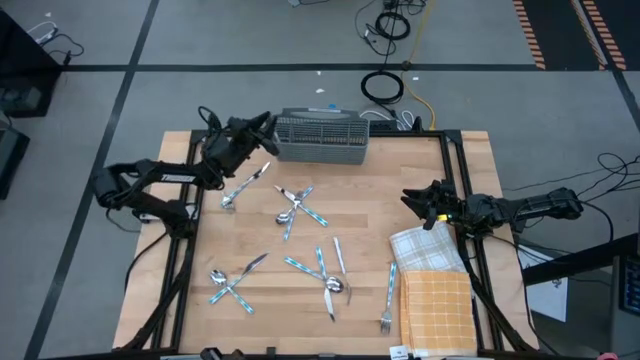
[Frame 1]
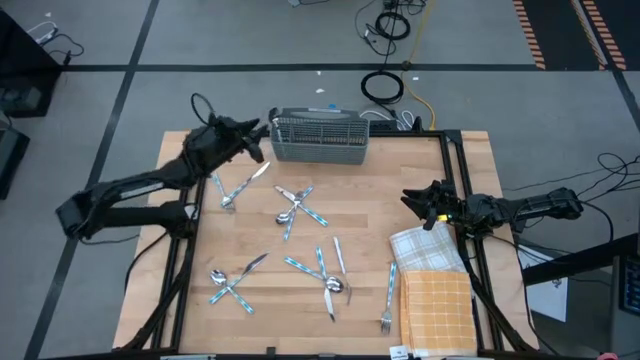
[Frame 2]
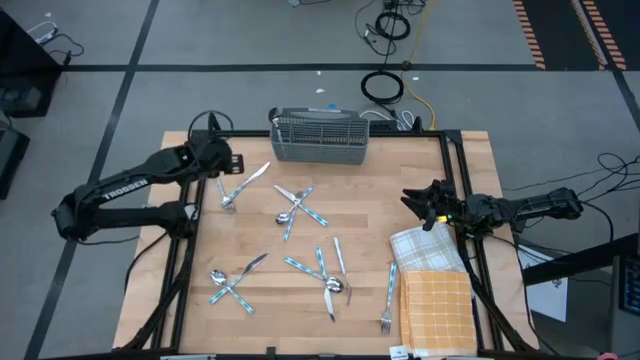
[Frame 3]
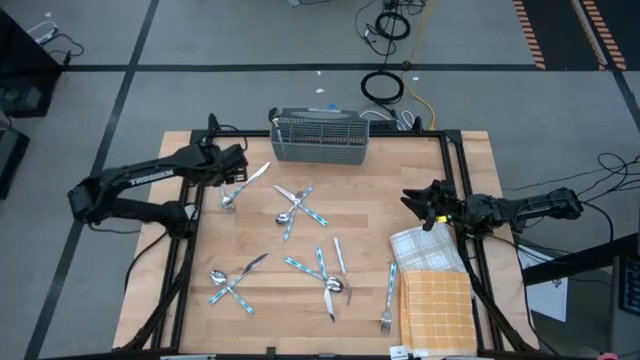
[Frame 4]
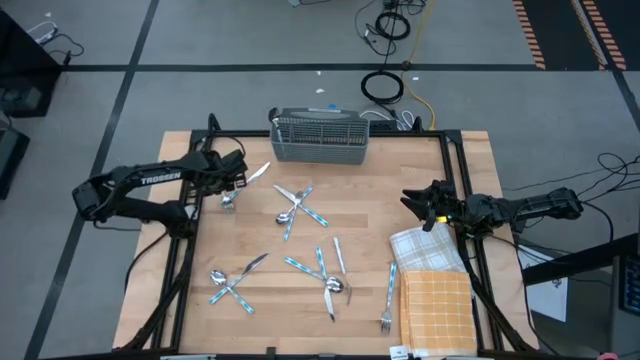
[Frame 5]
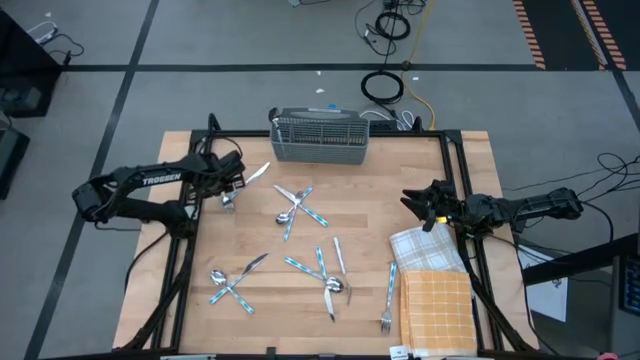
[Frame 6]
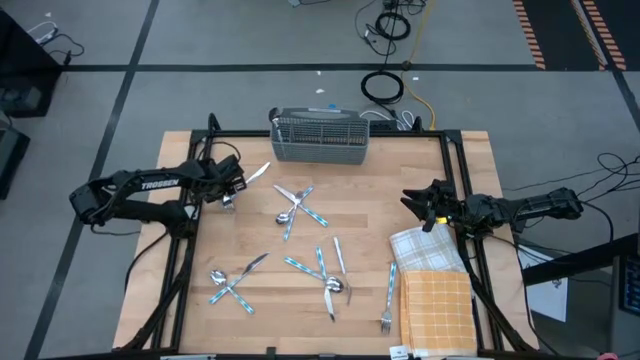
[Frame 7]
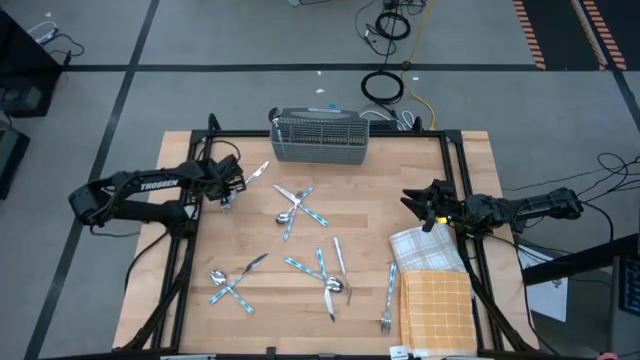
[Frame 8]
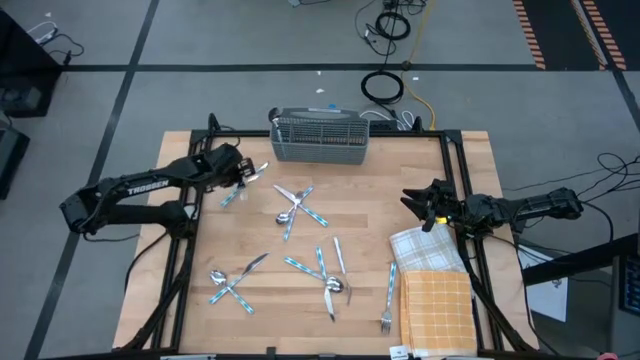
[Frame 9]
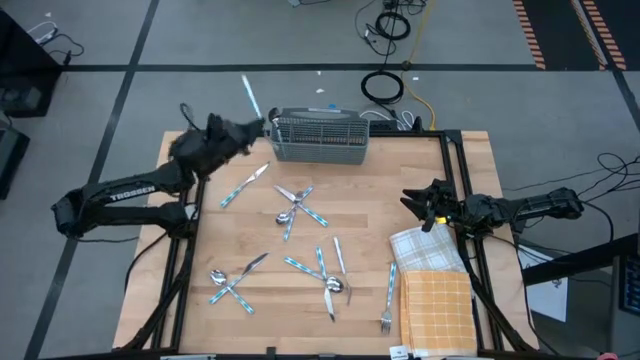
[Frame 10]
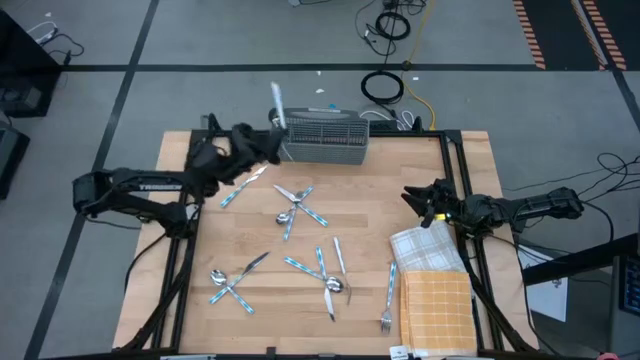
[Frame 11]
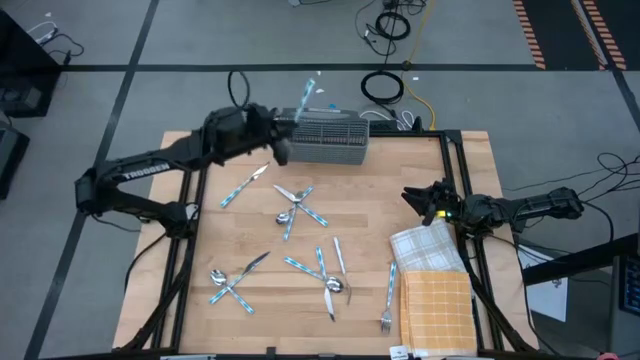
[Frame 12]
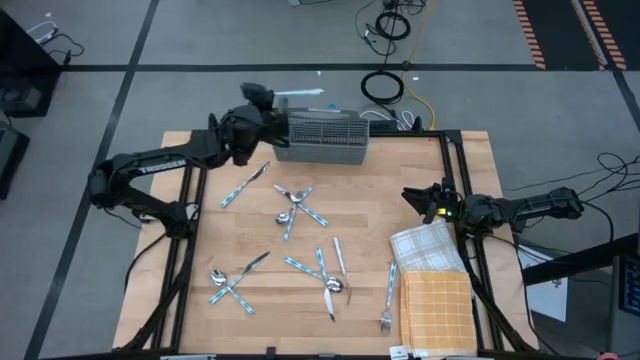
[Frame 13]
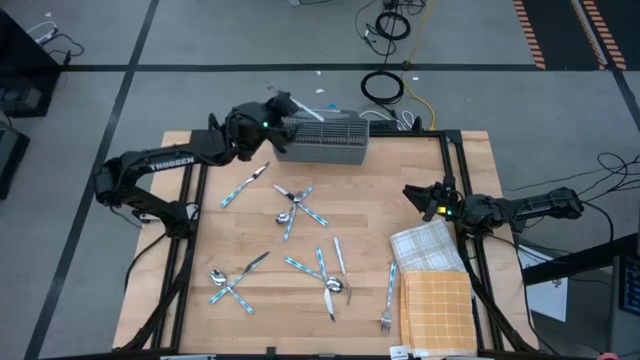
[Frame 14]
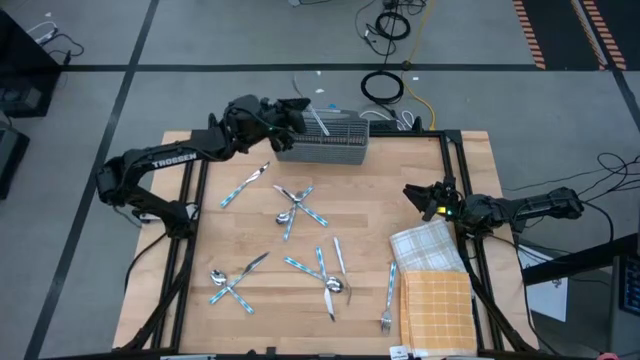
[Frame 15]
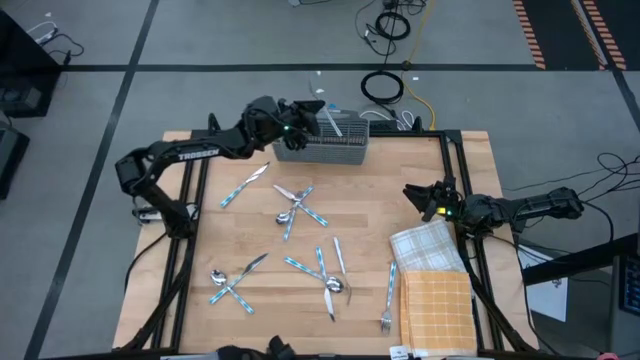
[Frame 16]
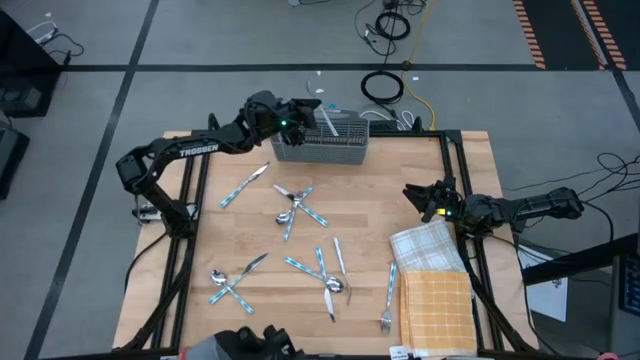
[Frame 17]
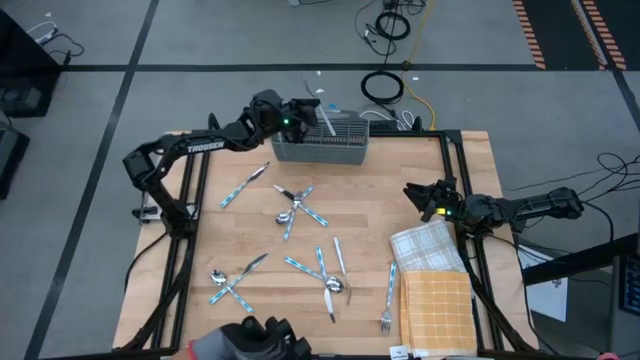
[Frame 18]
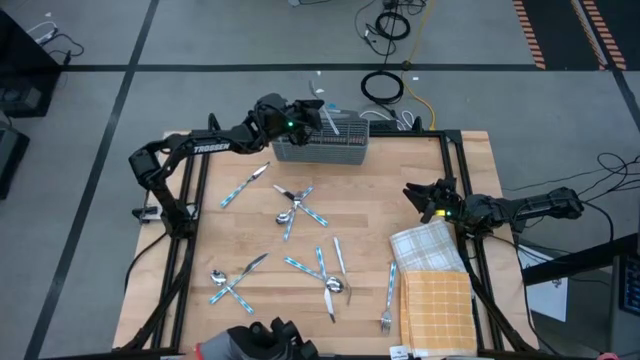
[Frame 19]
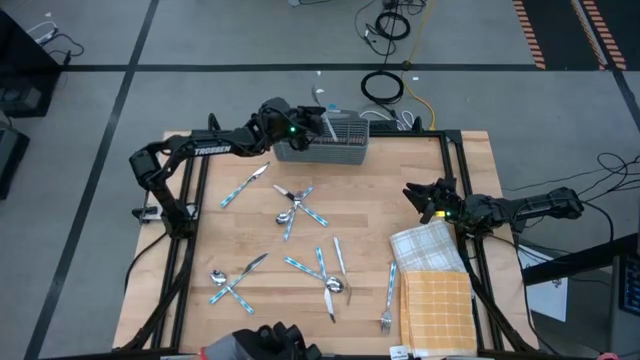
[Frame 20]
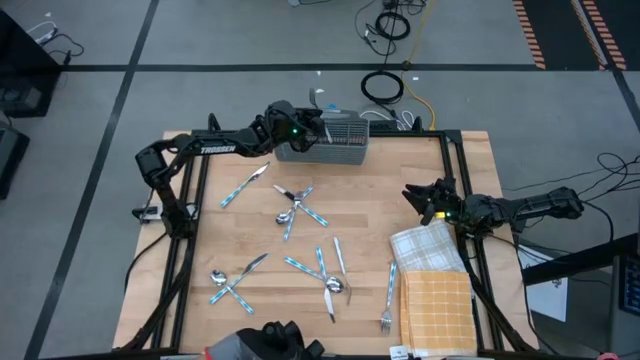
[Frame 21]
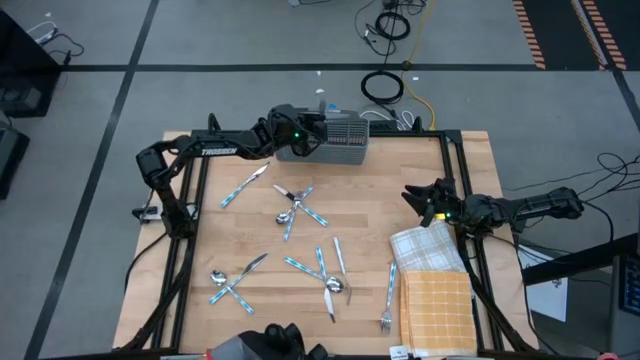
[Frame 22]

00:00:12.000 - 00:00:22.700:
Task: Sort silverware
Put the top left blue fork into the gray silverware basket

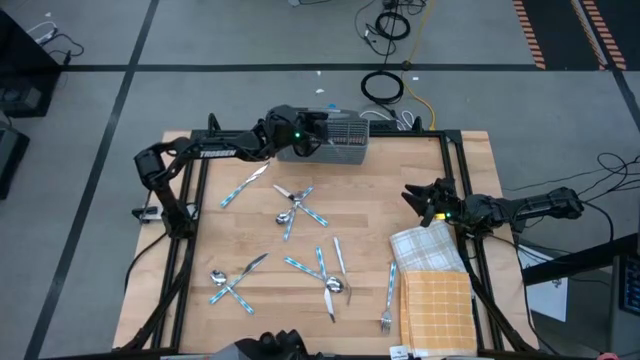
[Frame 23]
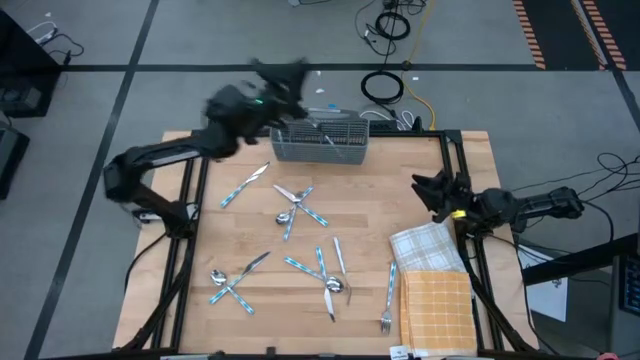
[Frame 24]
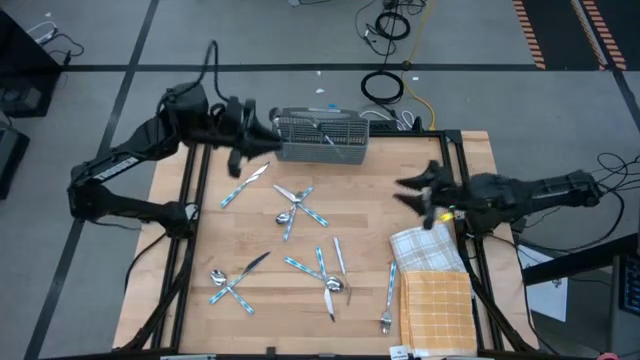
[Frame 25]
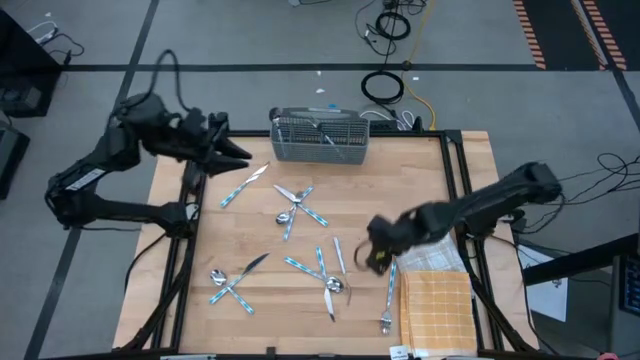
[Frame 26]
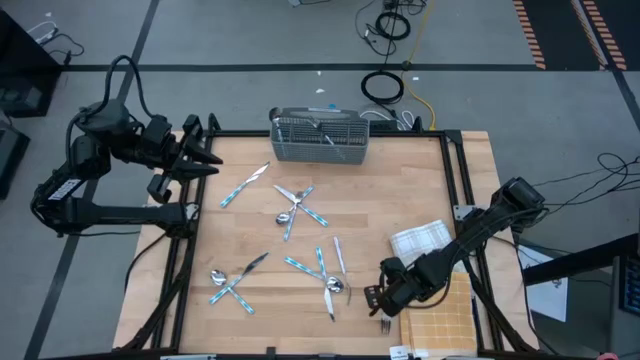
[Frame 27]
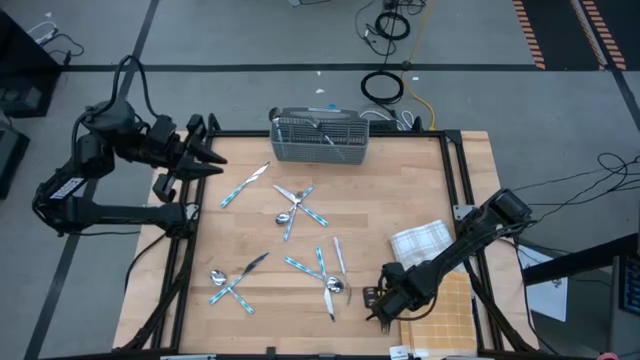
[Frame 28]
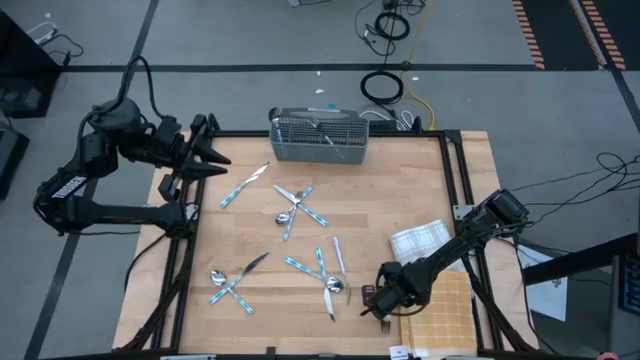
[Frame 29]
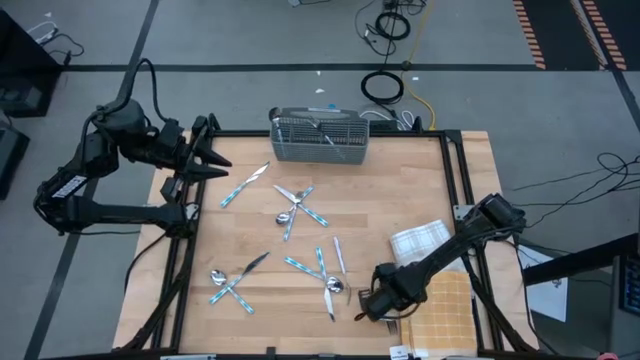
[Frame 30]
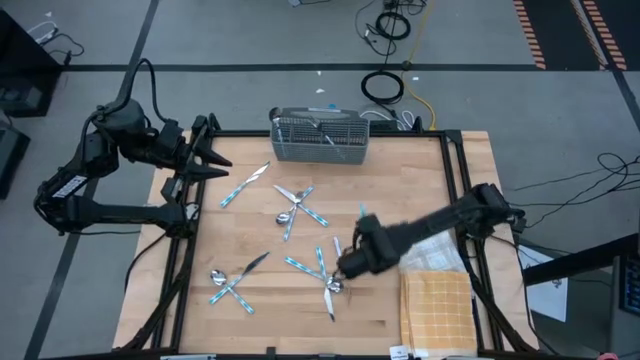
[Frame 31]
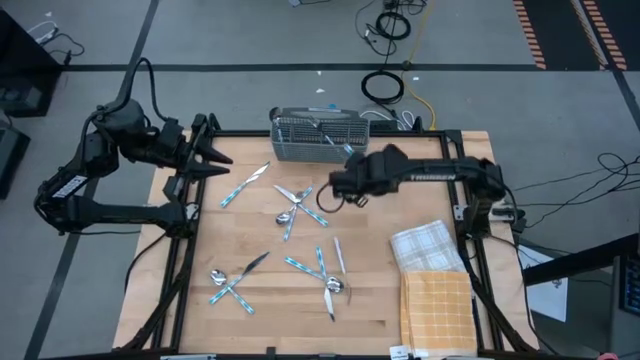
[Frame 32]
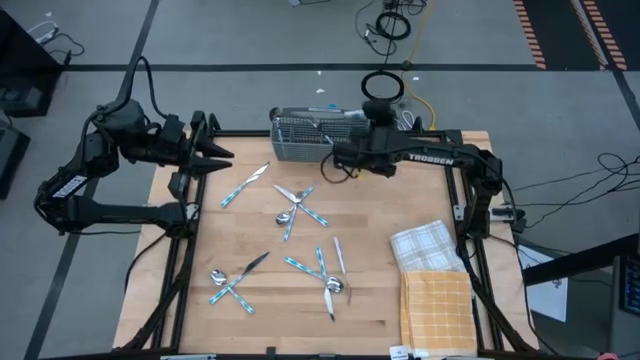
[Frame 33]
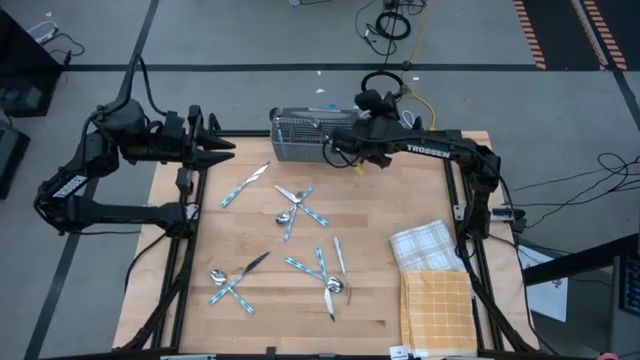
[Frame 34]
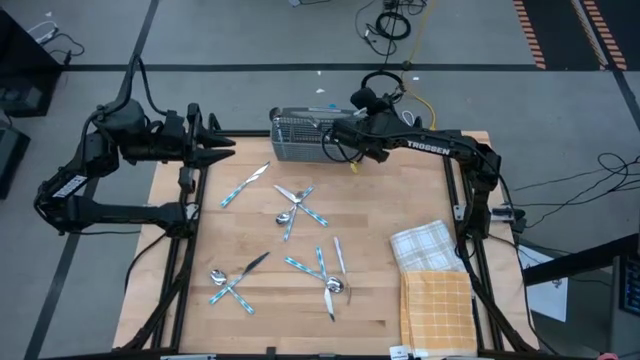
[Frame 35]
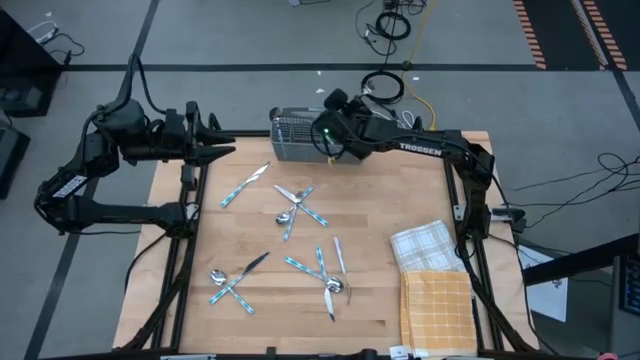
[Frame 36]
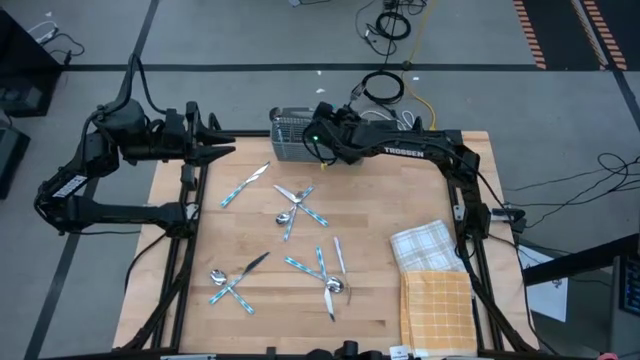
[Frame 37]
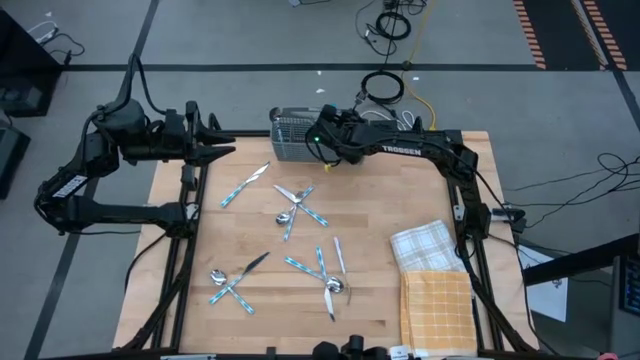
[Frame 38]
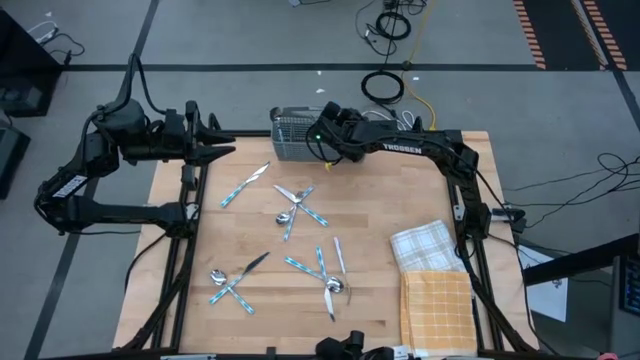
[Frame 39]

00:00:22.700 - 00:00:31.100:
Put the bottom right blue fork into the gray silverware basket

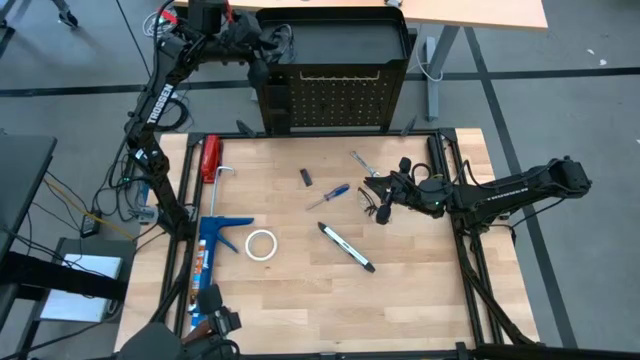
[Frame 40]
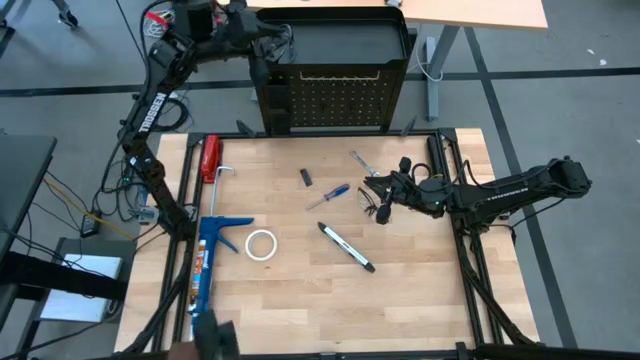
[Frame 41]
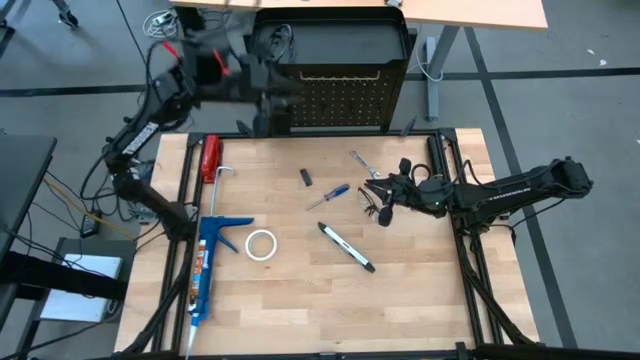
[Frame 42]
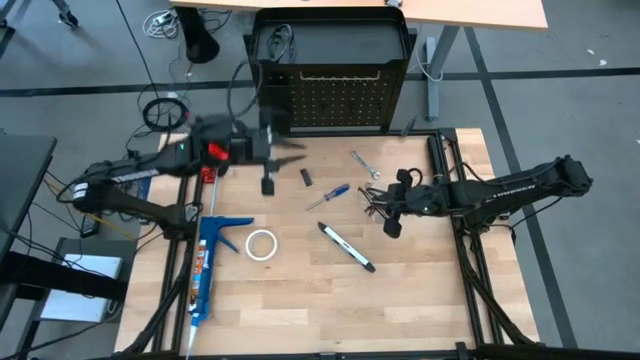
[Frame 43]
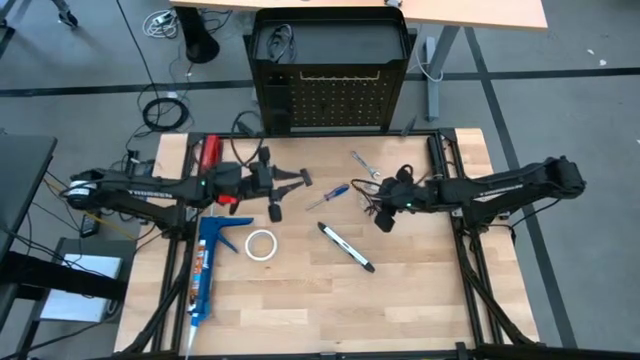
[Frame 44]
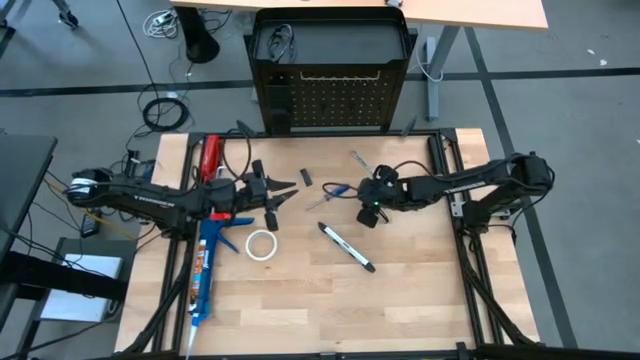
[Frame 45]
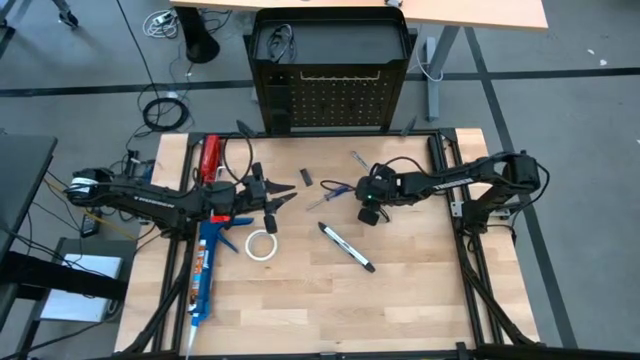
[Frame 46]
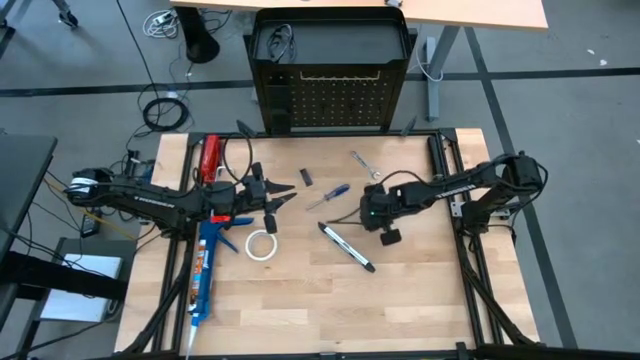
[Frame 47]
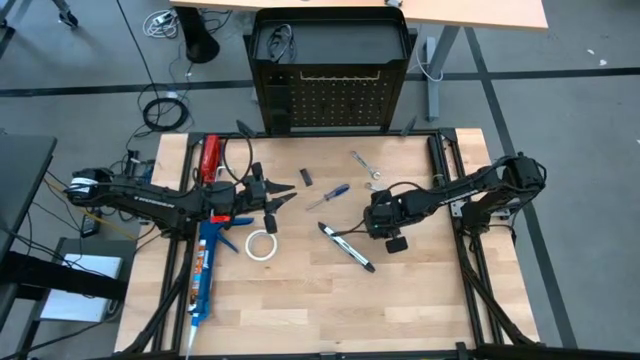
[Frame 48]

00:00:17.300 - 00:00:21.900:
Task: Hang tools onto peg board
Put the black safety glasses on the top of the pegboard
